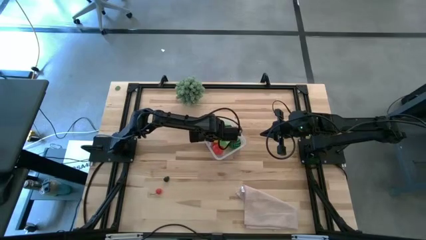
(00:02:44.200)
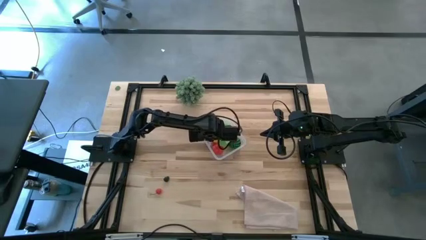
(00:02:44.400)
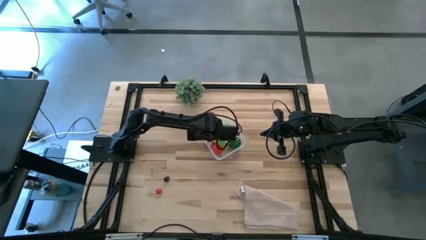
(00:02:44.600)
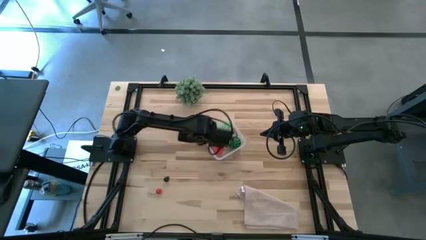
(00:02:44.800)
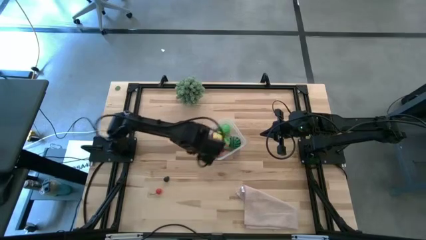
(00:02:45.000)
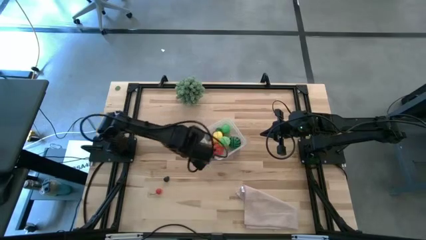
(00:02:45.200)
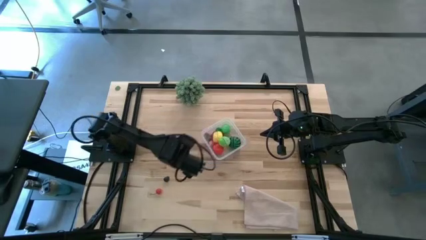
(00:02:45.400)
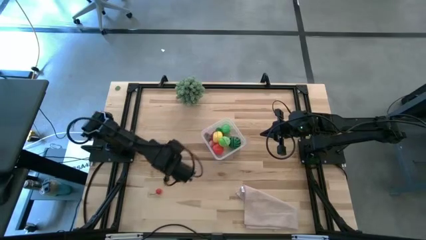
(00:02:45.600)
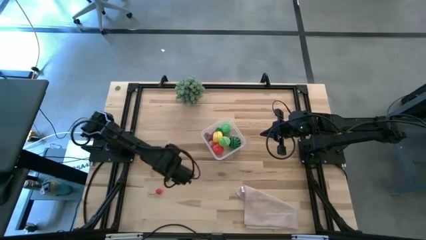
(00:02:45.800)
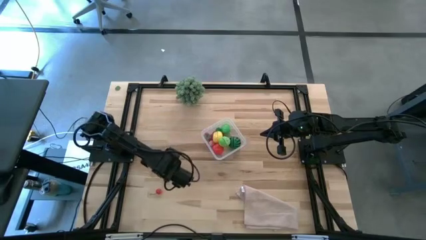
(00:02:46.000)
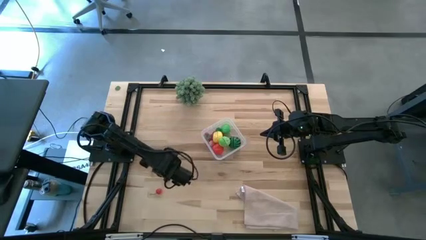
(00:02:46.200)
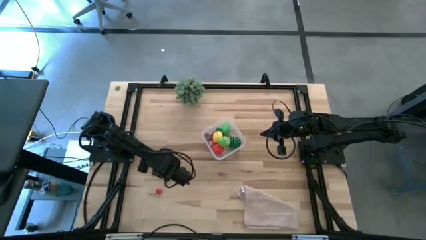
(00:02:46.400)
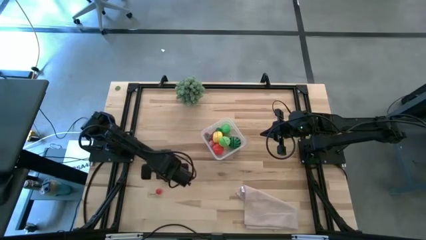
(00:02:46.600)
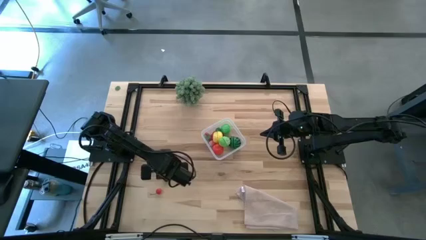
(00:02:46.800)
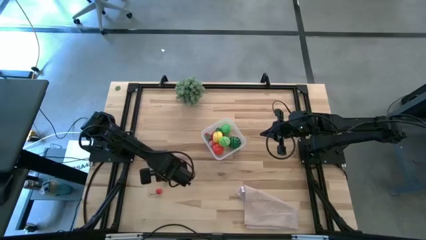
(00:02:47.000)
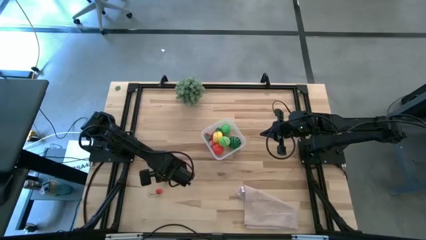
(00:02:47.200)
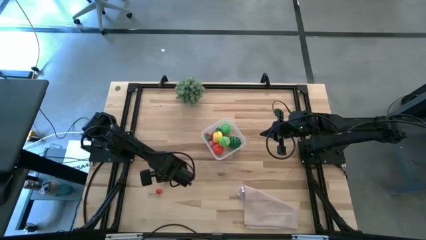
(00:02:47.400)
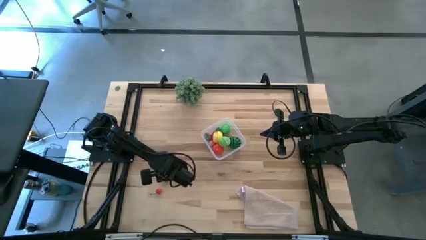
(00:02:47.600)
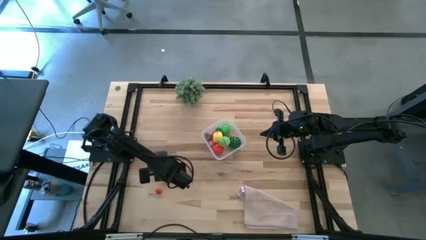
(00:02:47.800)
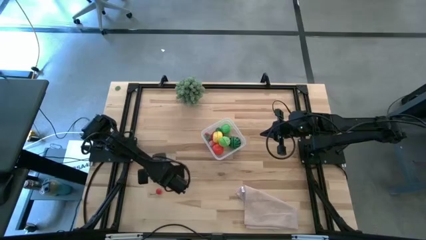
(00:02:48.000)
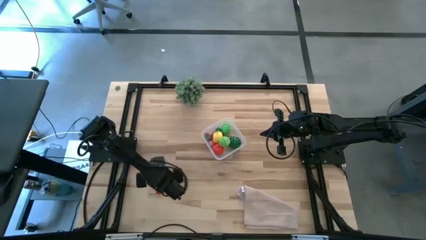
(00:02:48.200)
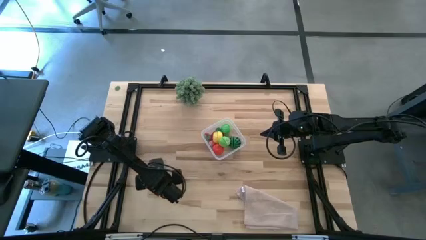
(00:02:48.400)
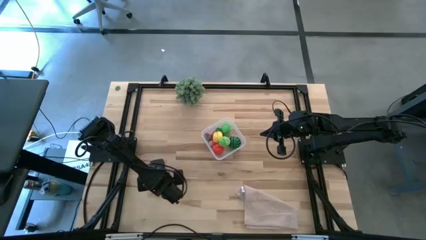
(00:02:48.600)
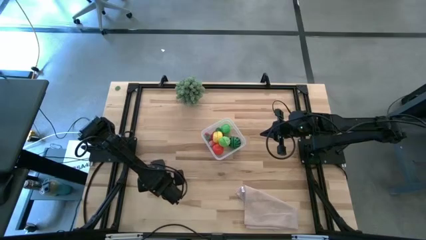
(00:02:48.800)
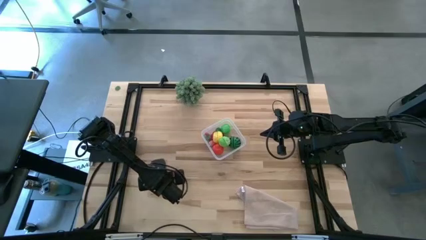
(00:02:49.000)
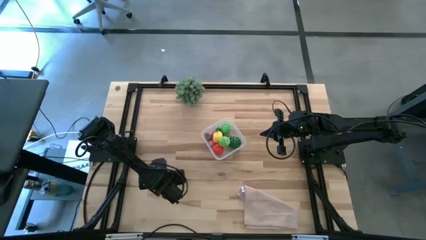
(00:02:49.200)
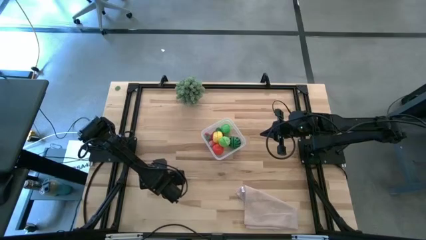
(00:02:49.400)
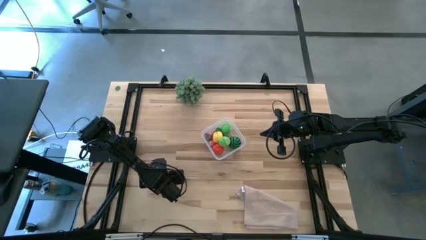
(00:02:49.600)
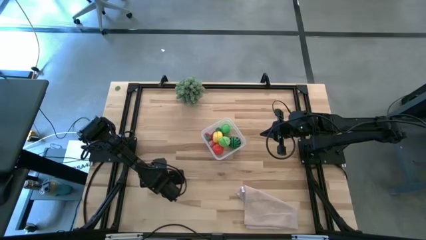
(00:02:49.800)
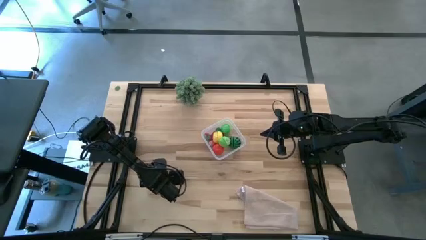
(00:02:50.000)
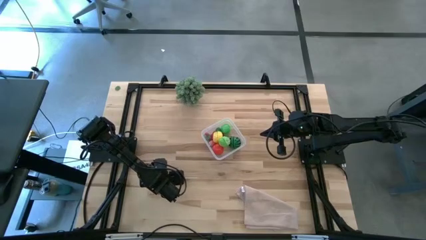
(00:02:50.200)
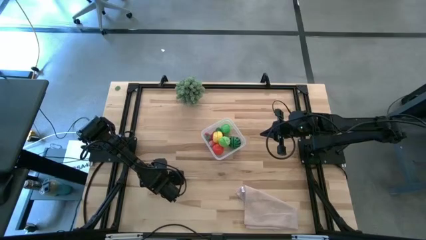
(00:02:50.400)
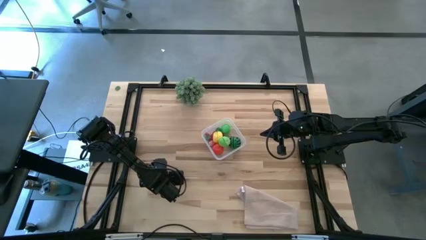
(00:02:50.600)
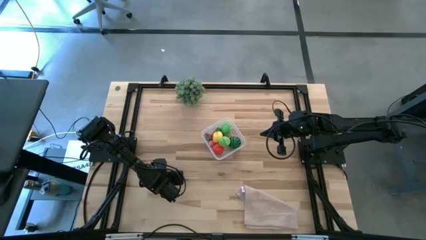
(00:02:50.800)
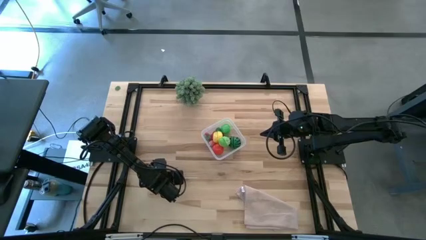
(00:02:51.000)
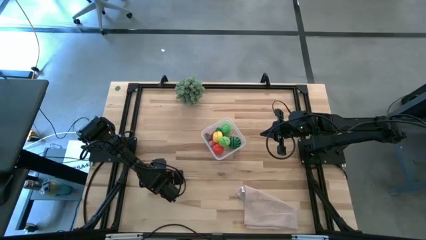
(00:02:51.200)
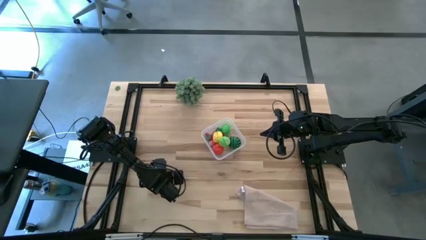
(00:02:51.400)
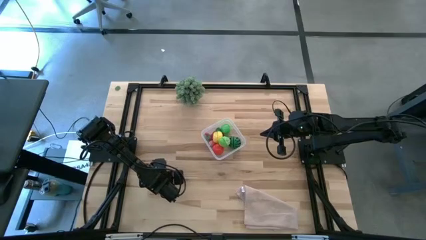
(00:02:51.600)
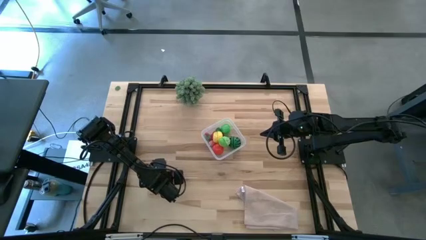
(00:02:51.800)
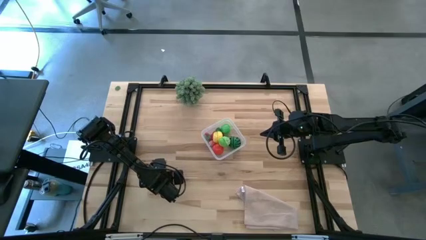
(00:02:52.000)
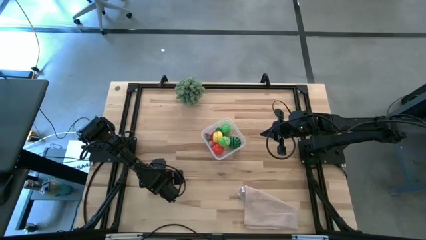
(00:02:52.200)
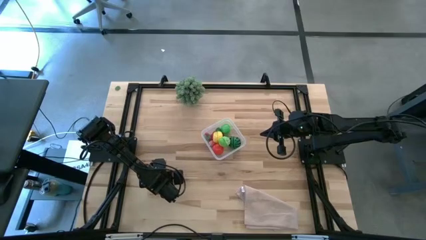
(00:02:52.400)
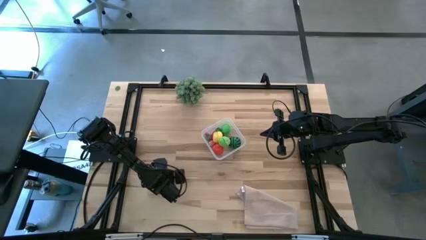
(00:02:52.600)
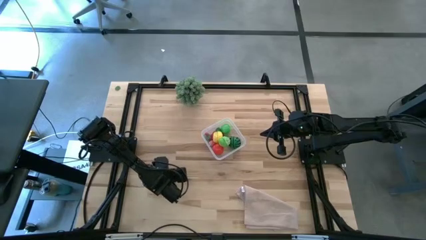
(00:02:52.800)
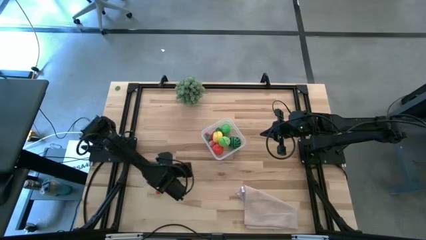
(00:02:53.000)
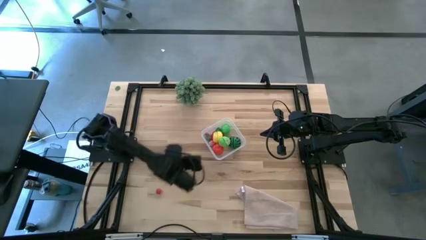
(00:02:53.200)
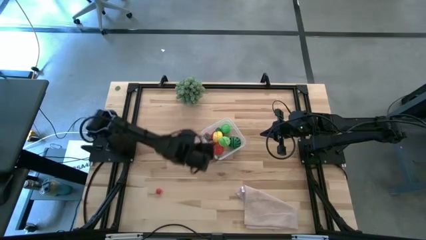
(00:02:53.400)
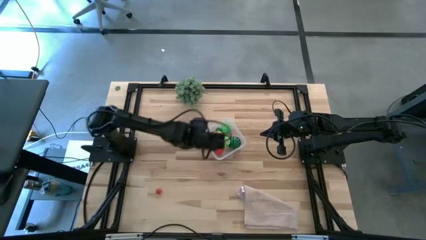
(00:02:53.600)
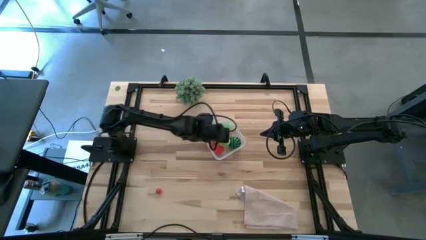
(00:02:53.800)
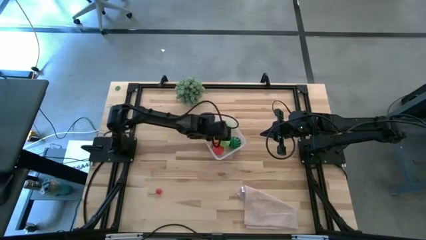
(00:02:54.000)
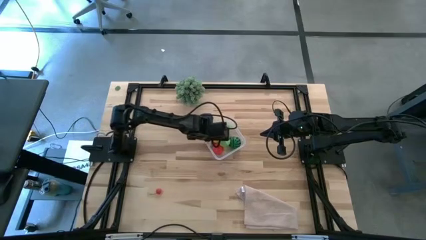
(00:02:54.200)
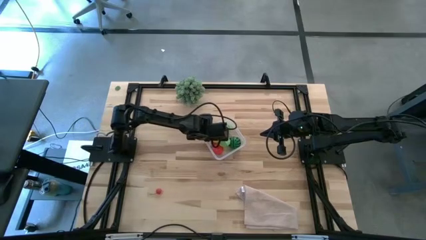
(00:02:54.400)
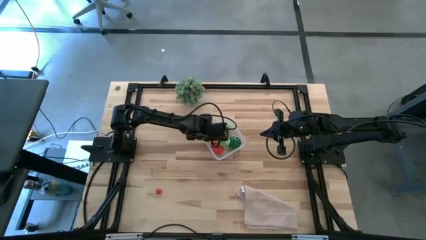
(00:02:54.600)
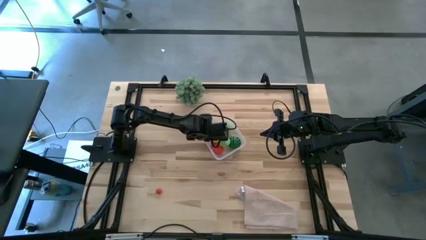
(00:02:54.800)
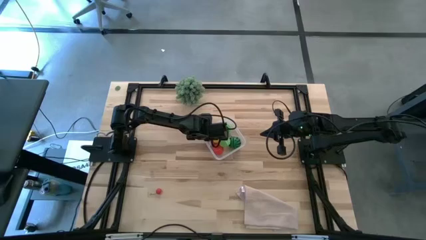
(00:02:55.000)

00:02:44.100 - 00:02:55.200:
Task: Pick and placing Produce into tupperware
Put the blackberry into the transparent bin

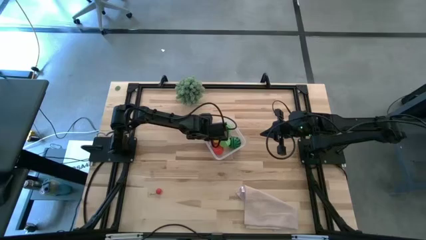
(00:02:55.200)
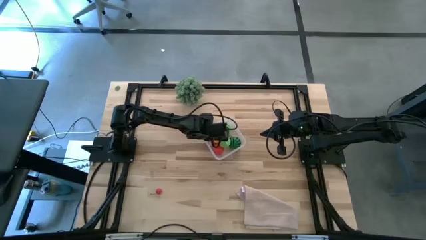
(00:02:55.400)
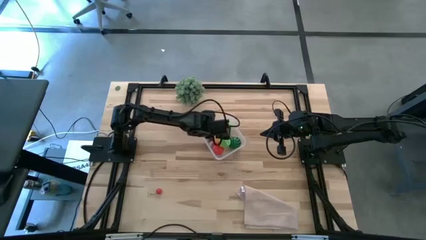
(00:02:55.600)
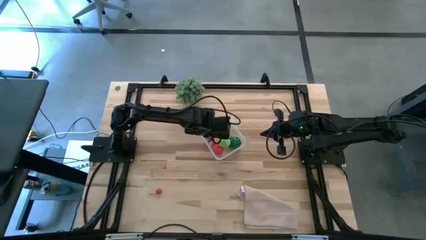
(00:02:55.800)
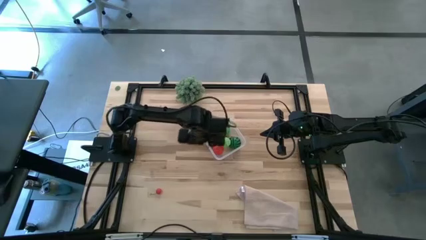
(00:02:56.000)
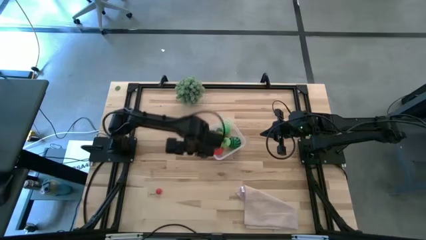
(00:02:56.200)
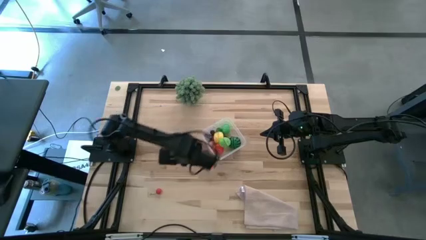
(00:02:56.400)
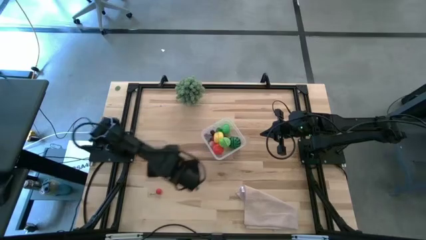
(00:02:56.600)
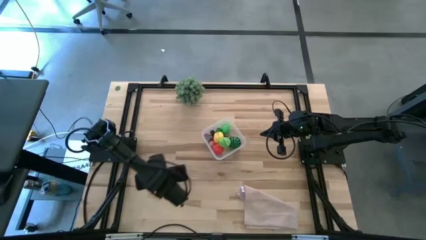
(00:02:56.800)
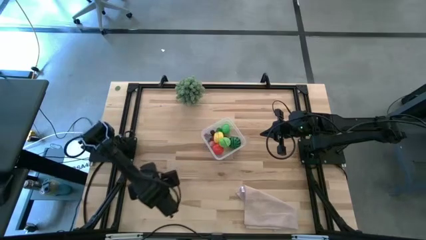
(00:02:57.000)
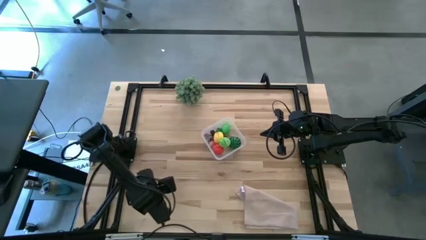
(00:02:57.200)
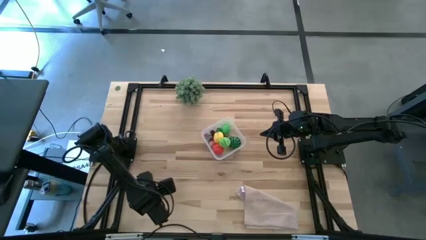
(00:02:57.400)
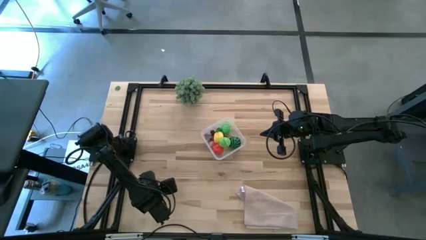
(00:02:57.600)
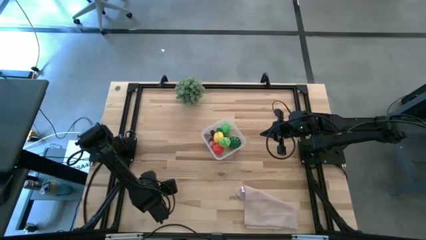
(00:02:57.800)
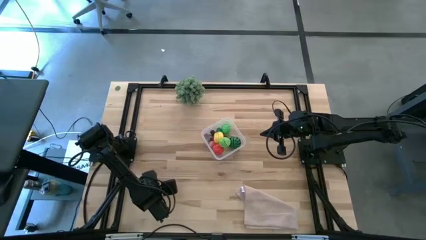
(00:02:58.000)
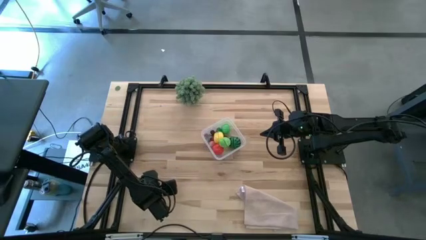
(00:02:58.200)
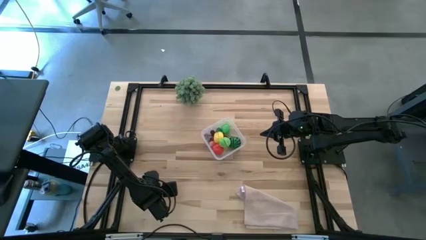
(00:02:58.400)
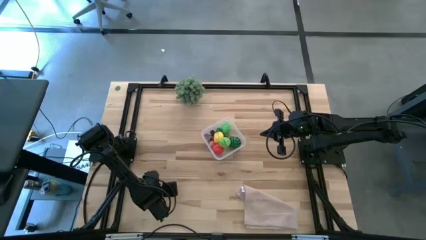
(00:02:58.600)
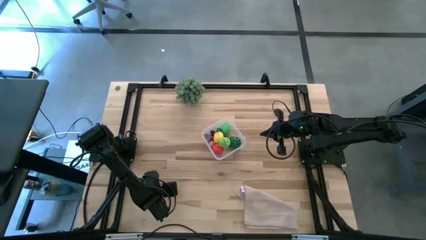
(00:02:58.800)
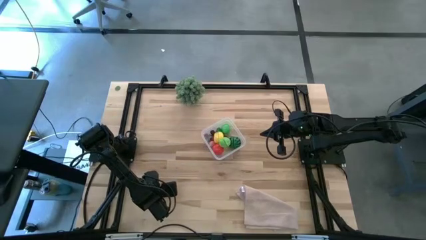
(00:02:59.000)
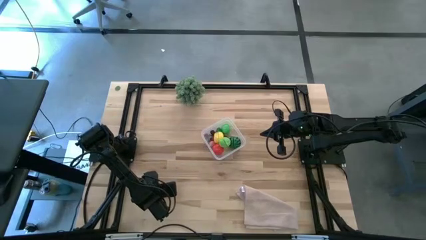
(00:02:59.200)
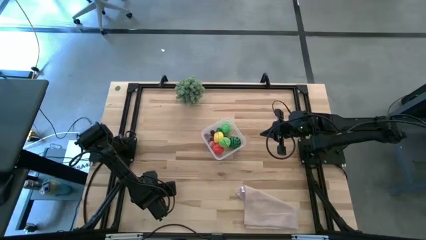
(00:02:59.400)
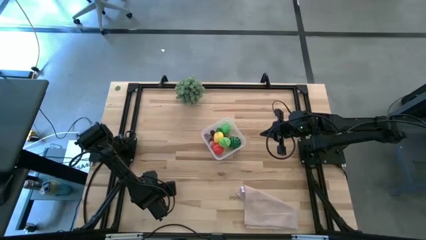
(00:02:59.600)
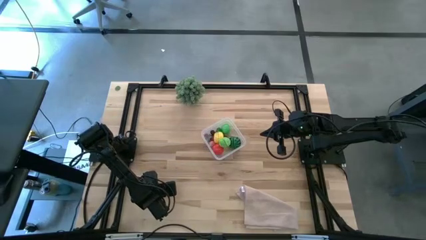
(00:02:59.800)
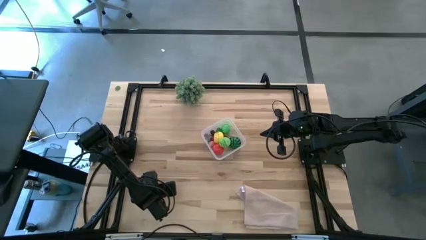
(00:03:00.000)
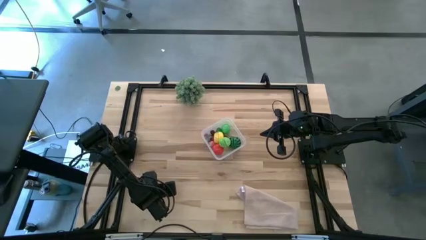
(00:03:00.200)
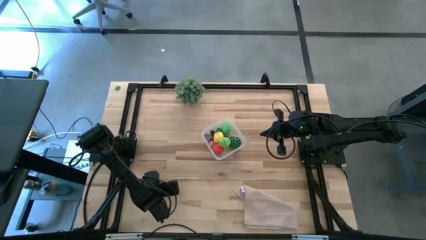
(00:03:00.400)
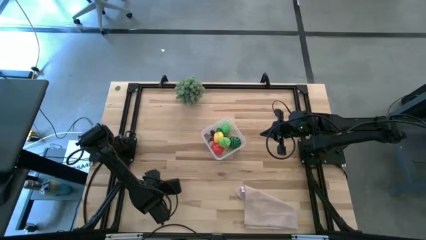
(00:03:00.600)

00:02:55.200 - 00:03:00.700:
Put the red cherry into the transparent bin
